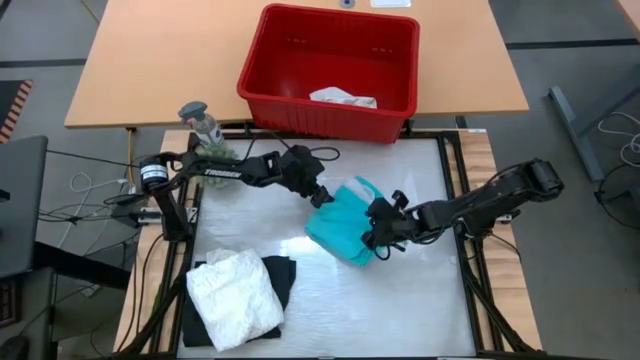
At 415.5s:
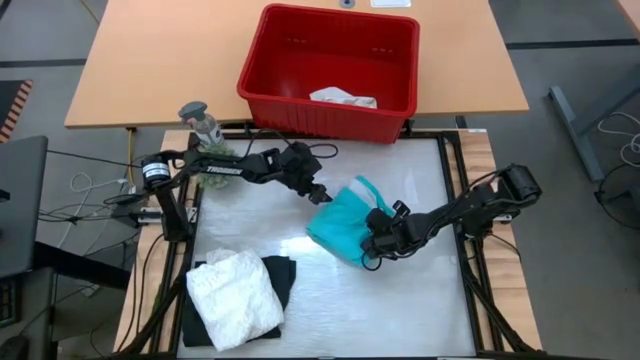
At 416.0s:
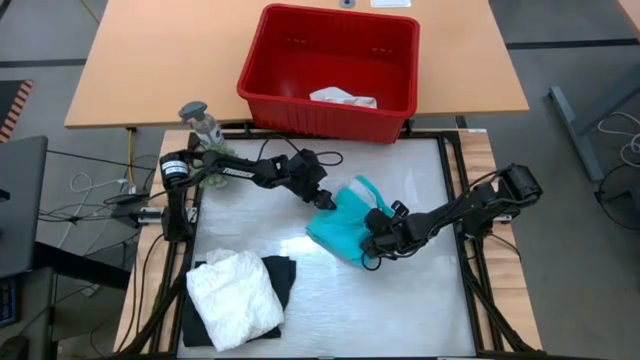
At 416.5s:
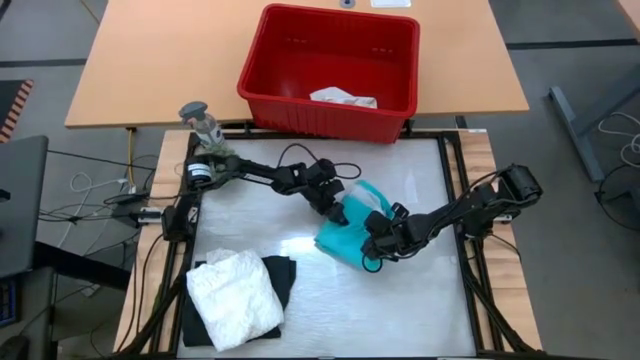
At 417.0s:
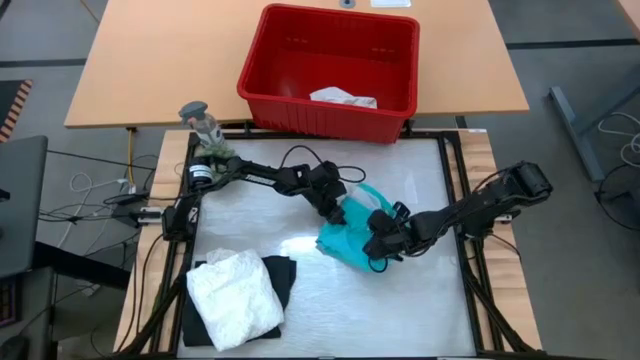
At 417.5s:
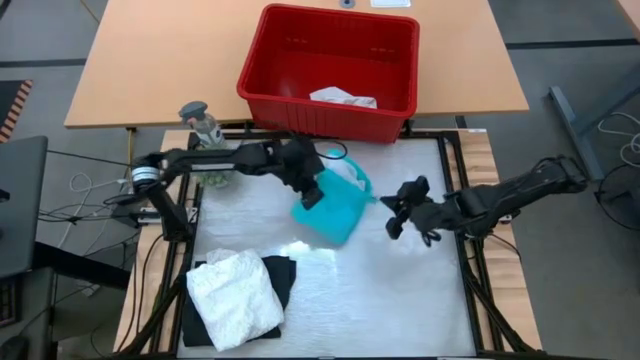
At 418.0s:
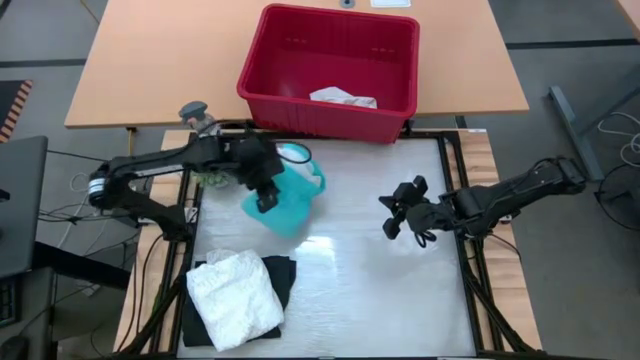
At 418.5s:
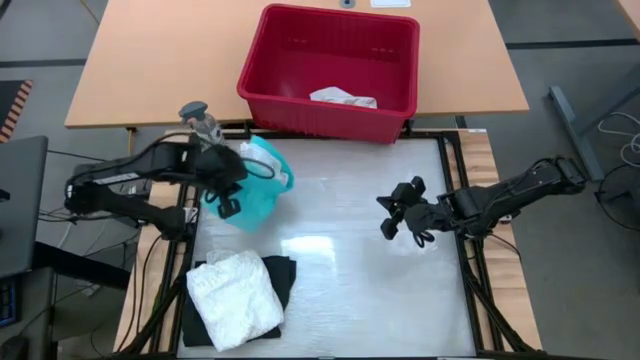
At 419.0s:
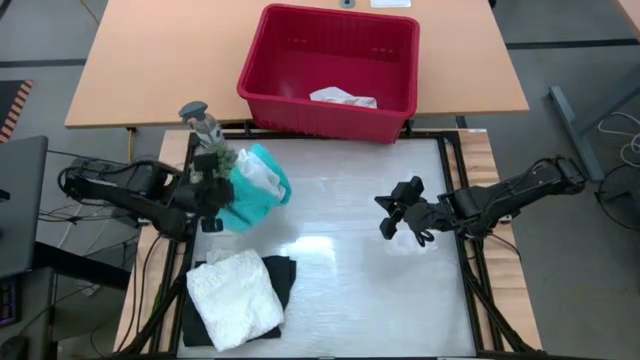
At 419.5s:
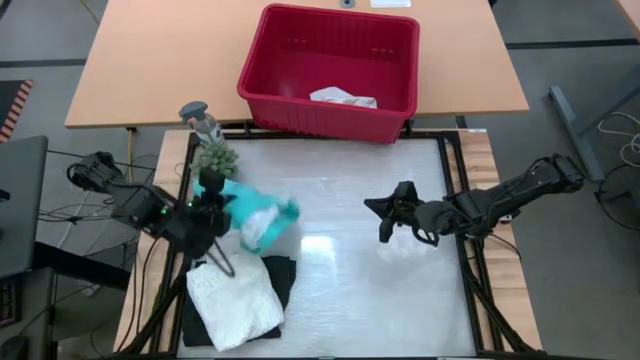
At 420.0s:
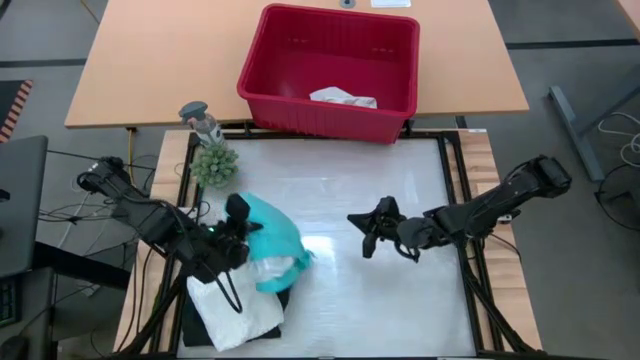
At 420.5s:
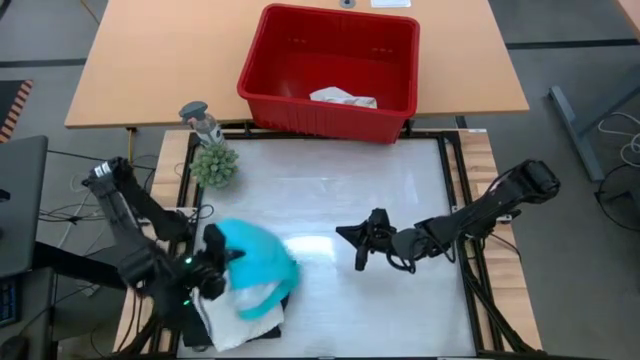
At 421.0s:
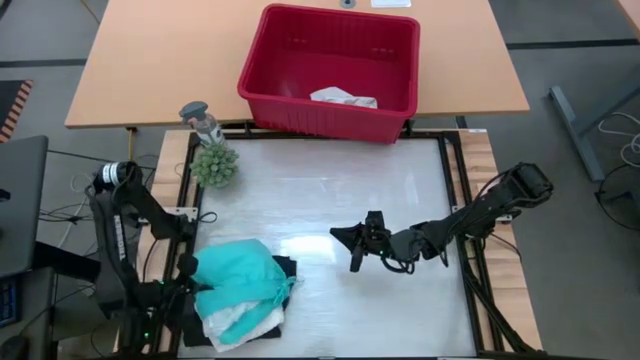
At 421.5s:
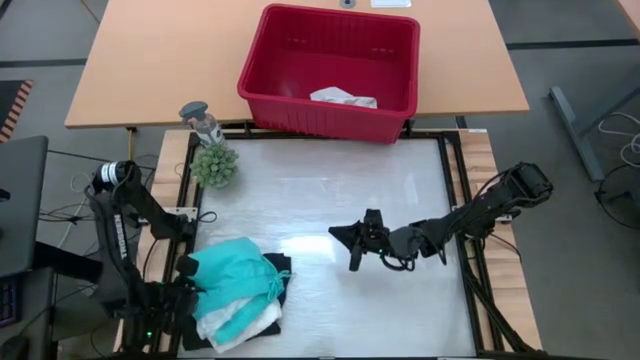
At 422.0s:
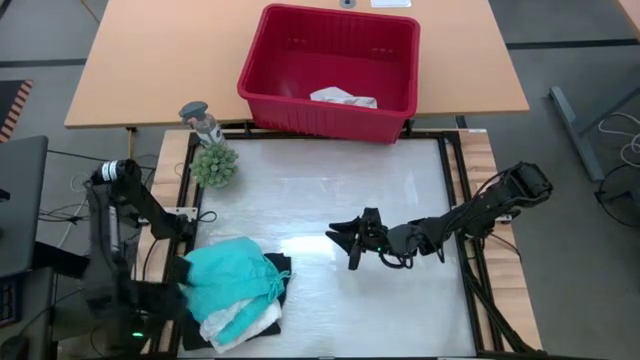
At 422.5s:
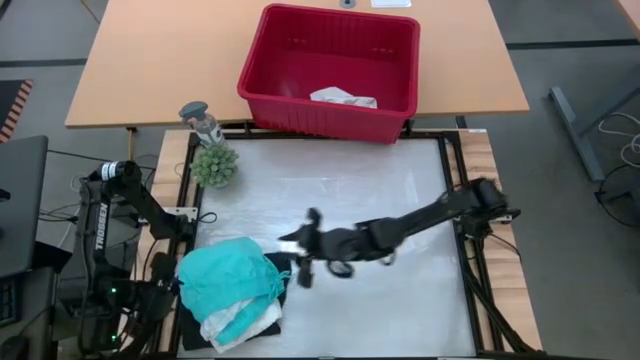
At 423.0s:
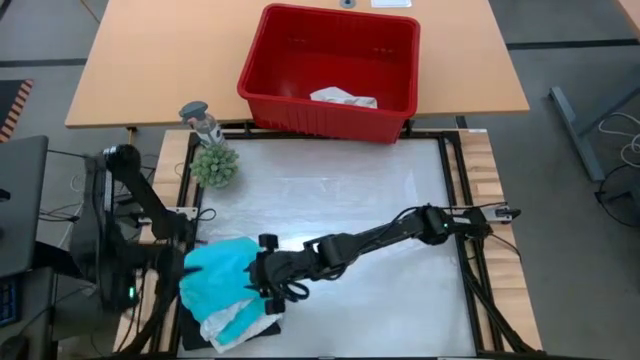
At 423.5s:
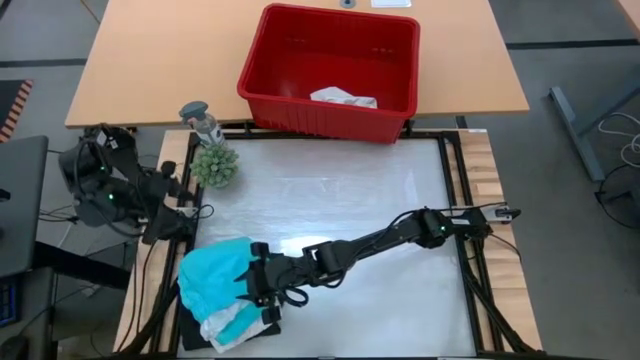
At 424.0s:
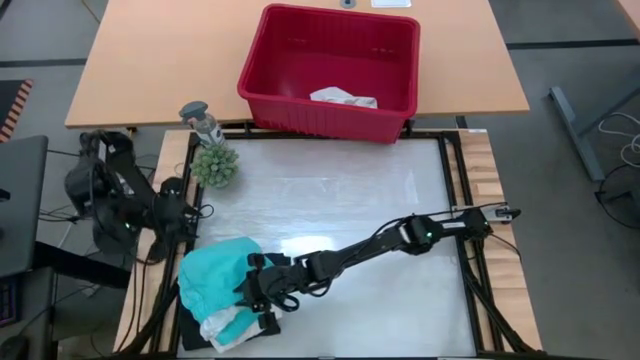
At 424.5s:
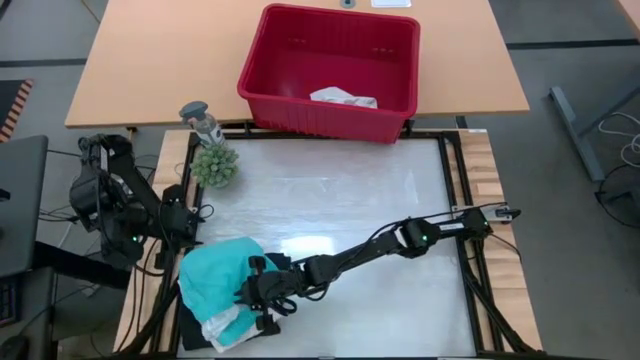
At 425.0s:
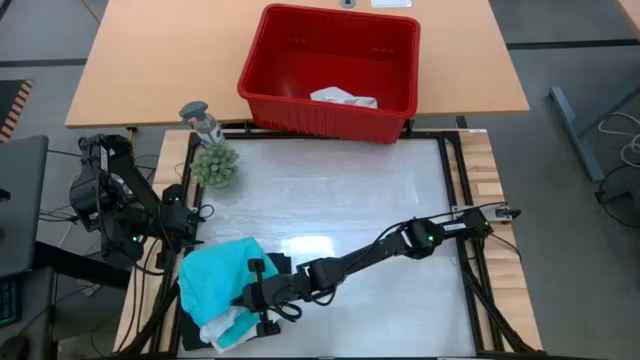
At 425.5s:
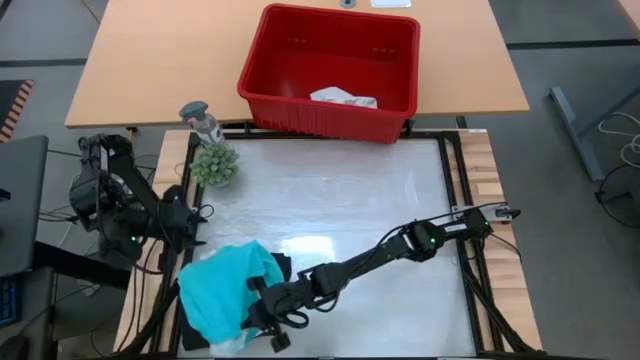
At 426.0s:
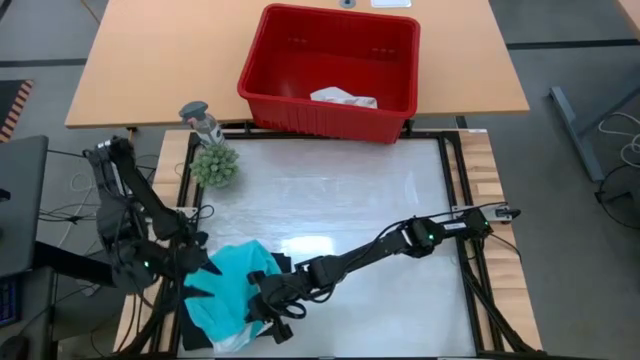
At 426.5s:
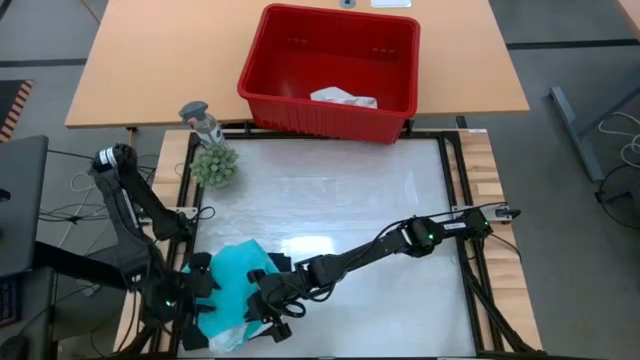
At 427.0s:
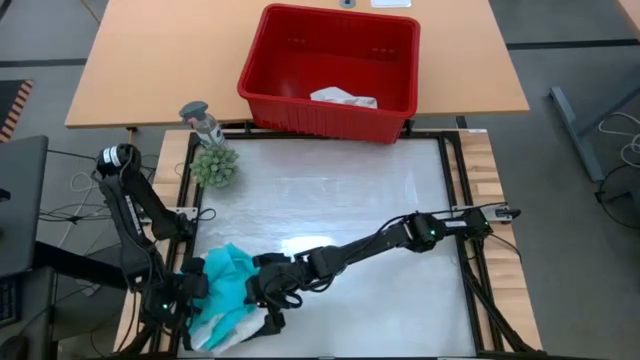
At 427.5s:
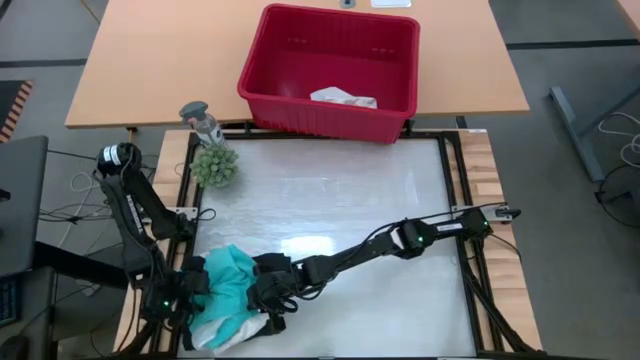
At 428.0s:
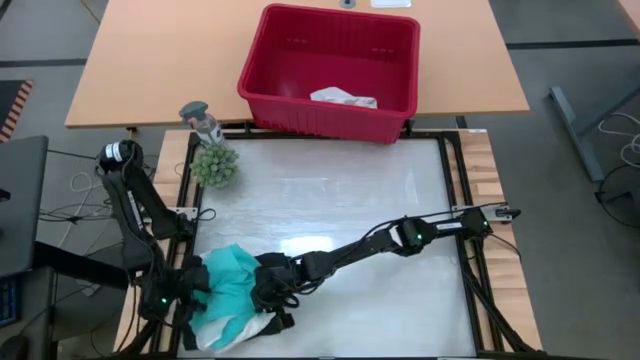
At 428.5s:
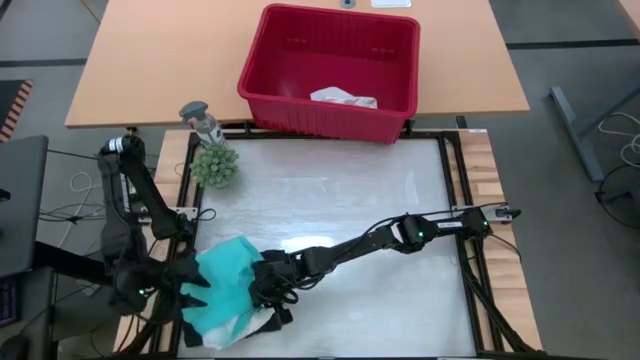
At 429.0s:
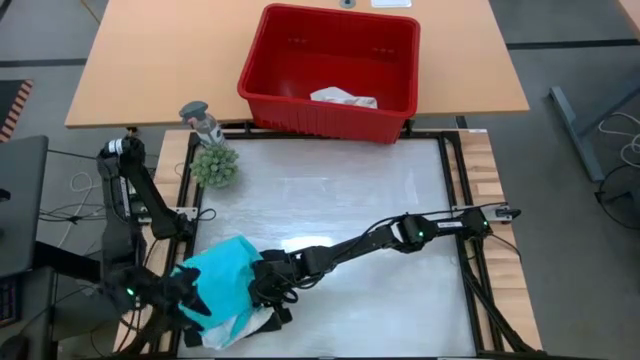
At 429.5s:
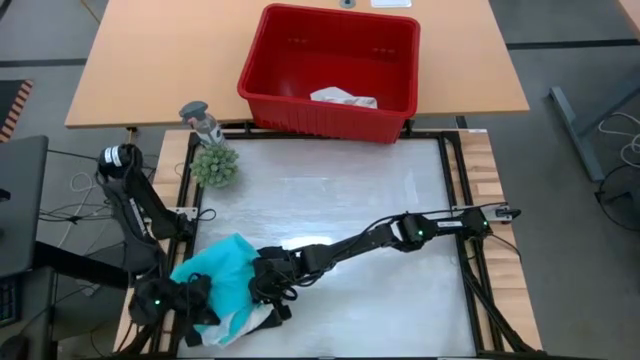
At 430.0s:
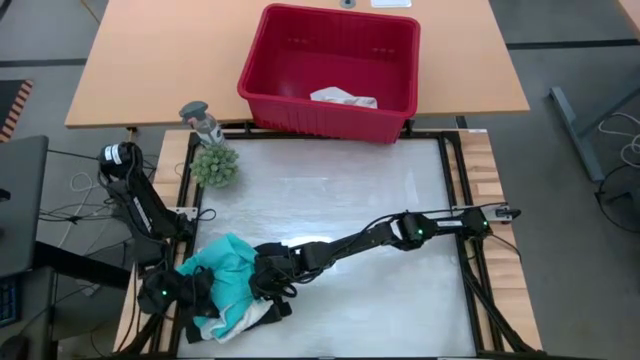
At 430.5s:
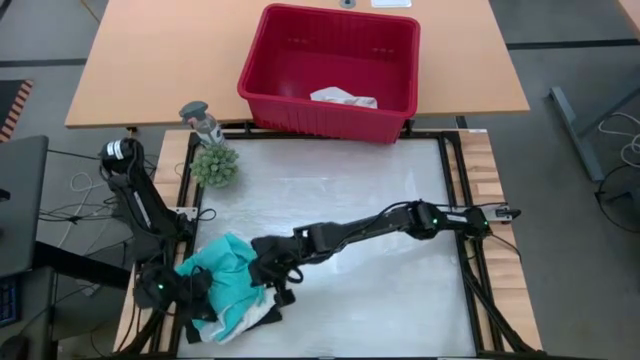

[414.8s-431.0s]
Task: Fold Laundry from Bin
Stack the blue shorts on top of the white dress

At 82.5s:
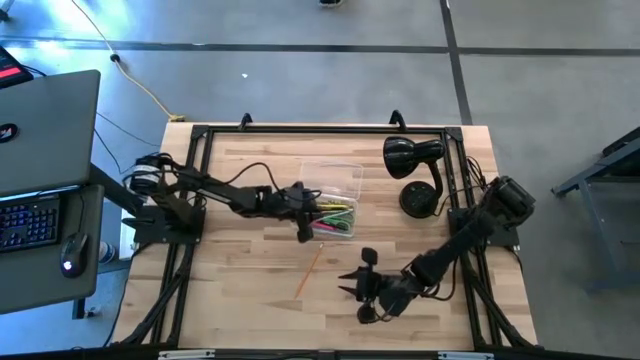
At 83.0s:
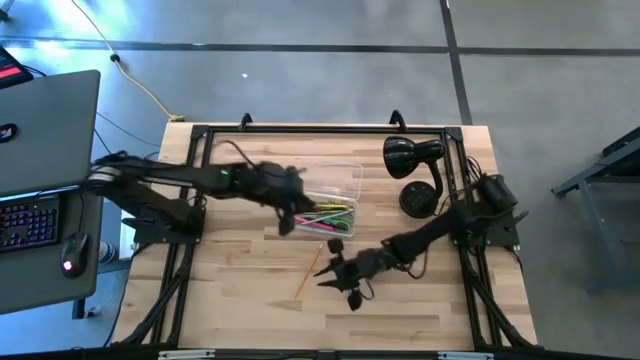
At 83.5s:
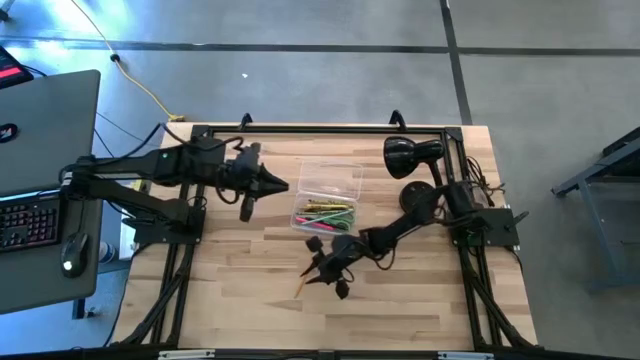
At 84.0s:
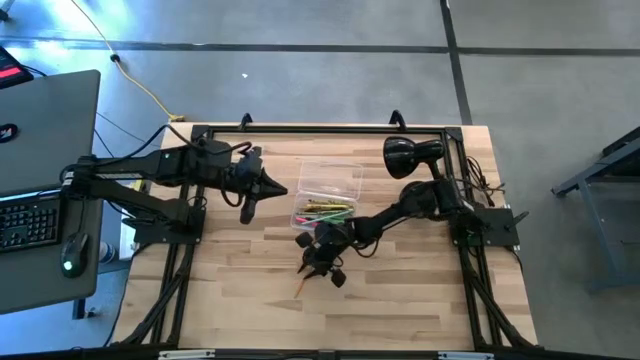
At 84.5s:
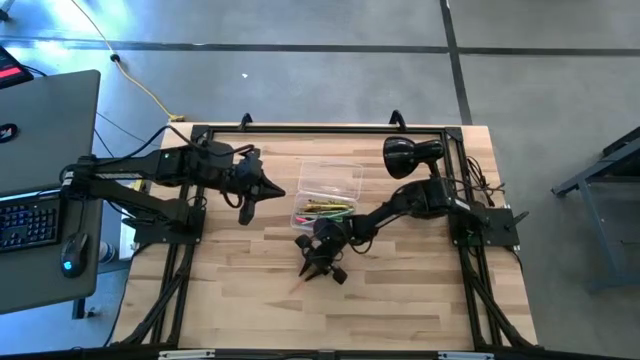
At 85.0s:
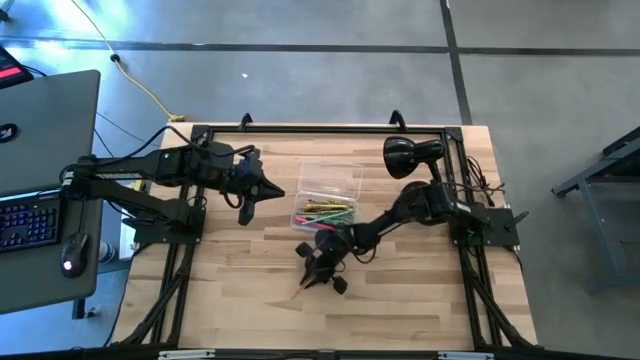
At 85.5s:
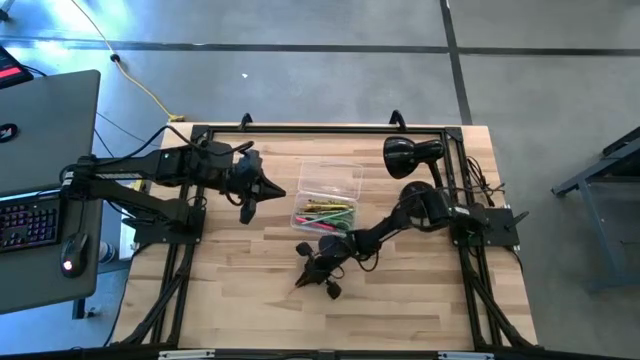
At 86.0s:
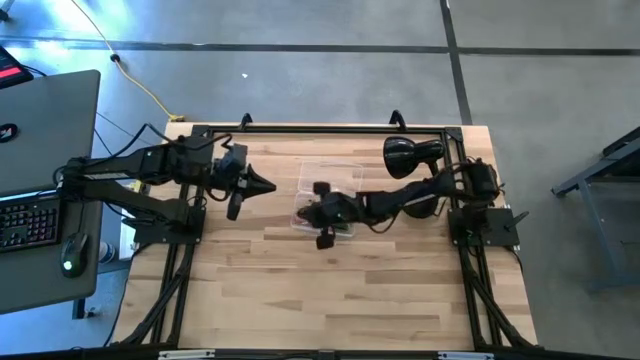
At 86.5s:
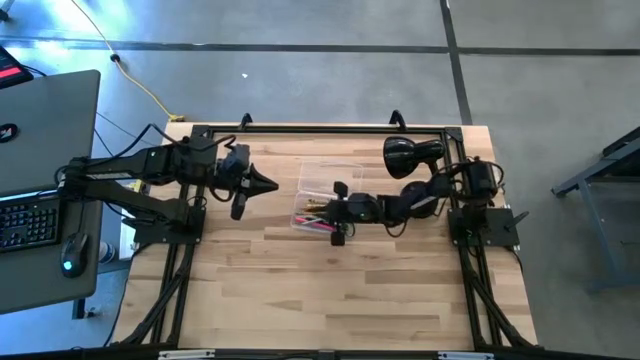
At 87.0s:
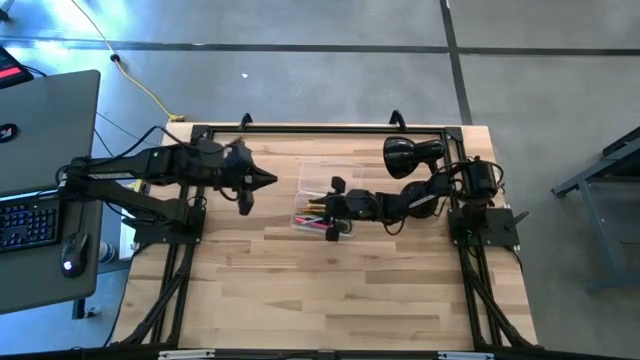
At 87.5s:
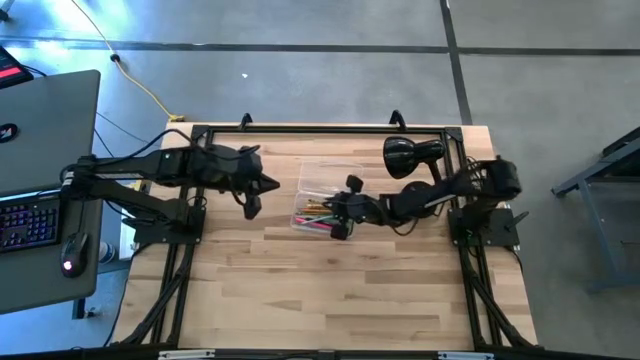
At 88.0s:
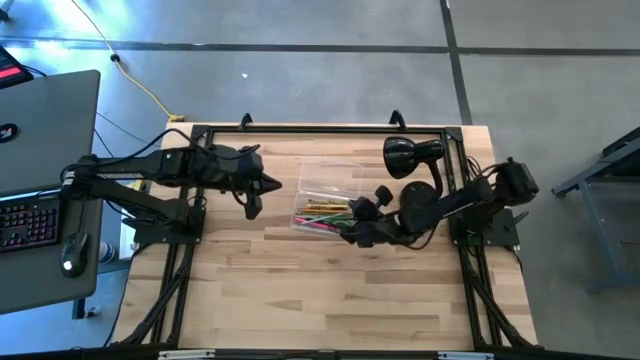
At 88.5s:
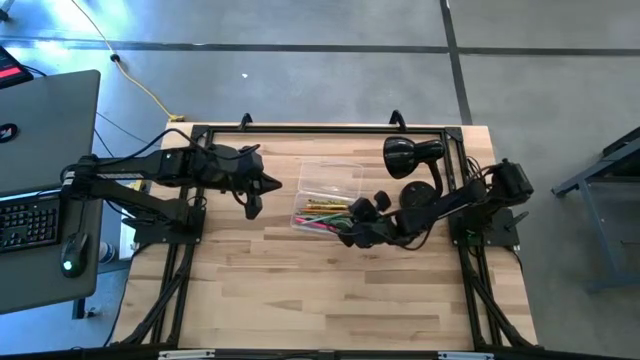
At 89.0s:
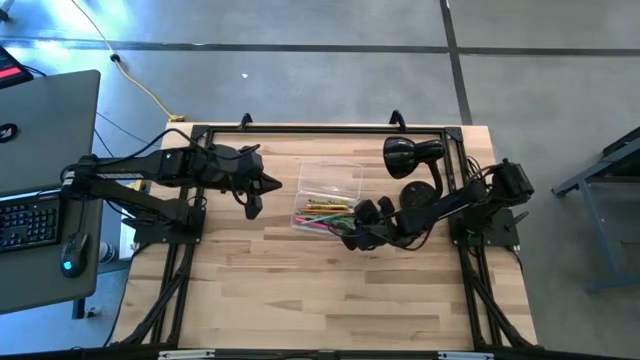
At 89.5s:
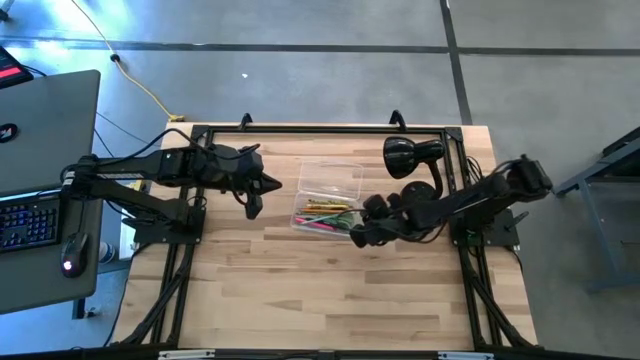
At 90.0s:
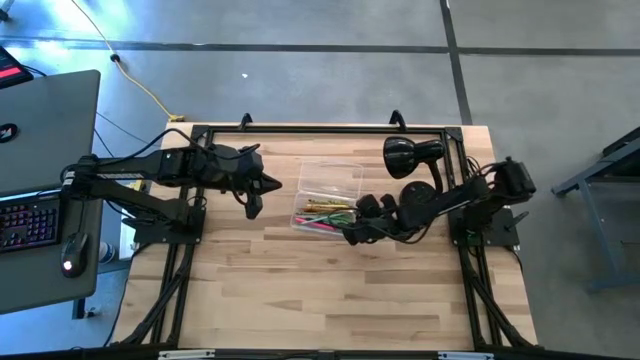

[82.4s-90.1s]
Task: Pick & place school supplies into a supply box
Put the orange pencil into the transparent supply box
